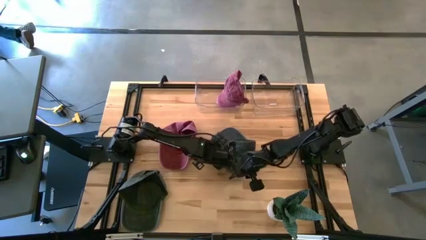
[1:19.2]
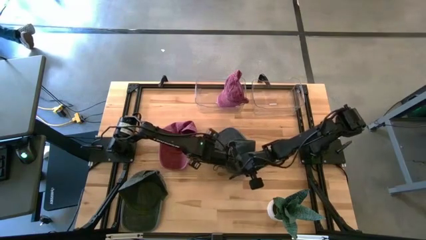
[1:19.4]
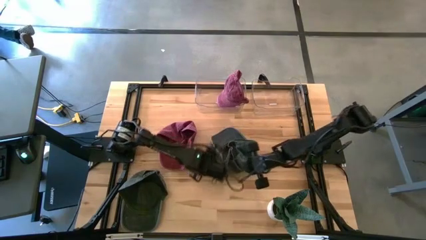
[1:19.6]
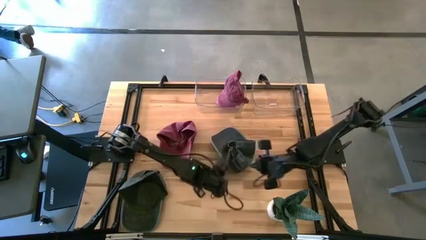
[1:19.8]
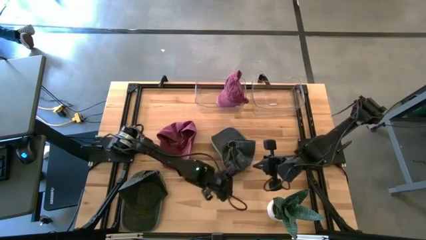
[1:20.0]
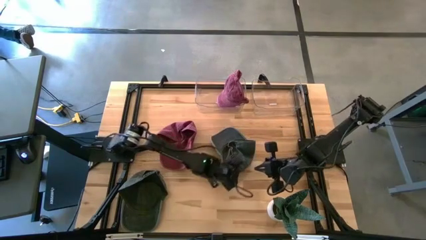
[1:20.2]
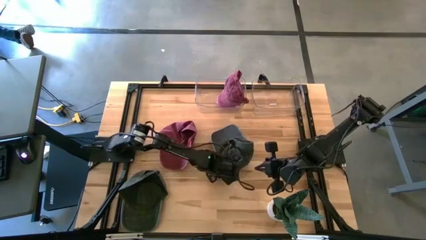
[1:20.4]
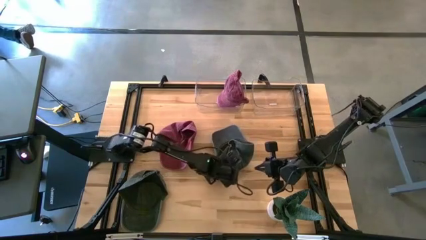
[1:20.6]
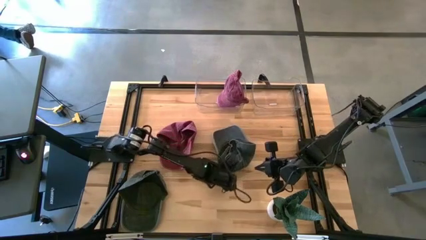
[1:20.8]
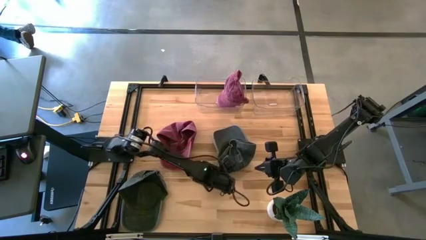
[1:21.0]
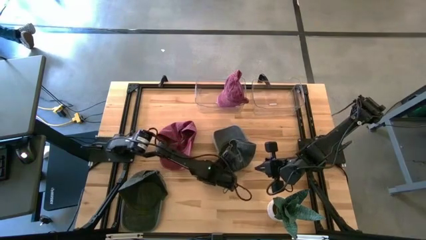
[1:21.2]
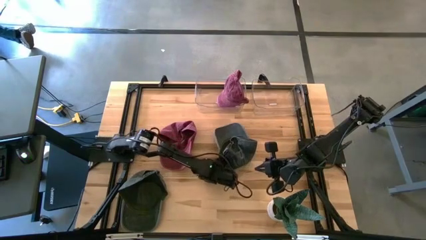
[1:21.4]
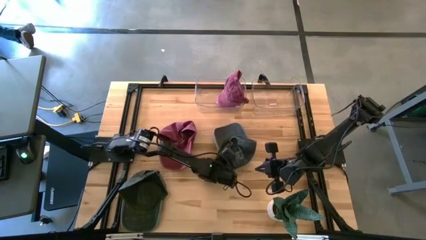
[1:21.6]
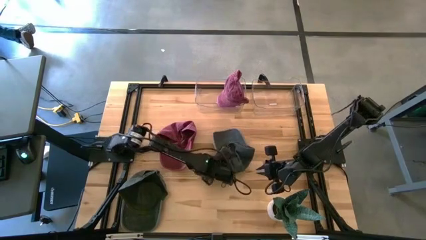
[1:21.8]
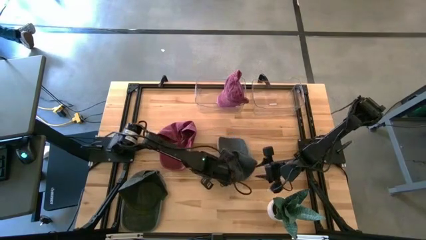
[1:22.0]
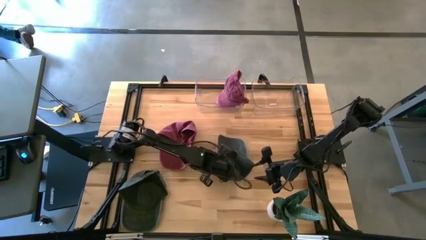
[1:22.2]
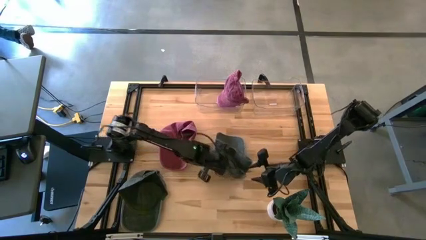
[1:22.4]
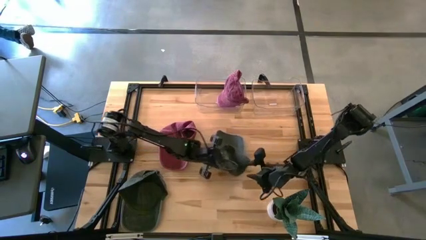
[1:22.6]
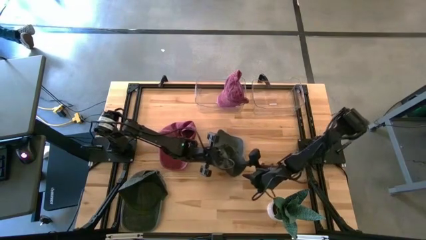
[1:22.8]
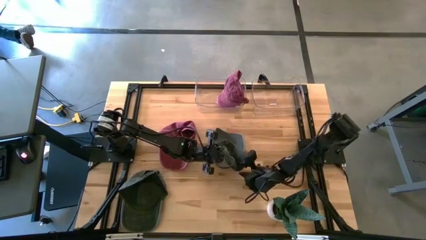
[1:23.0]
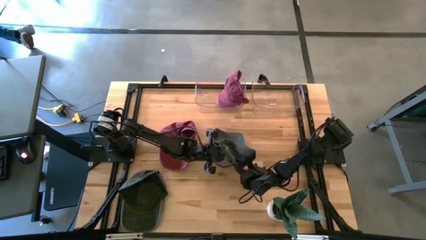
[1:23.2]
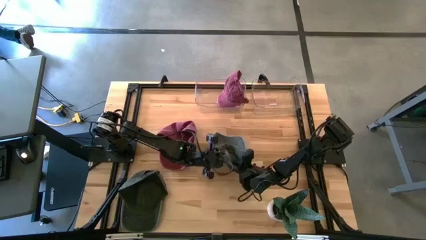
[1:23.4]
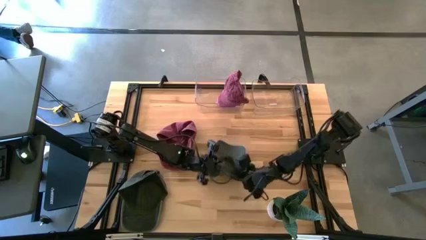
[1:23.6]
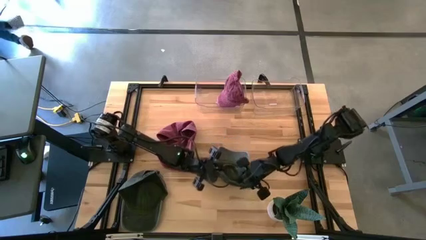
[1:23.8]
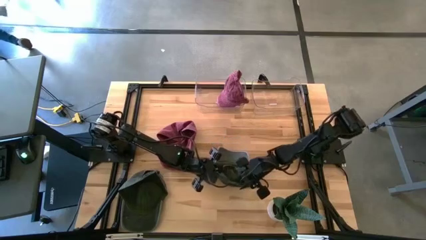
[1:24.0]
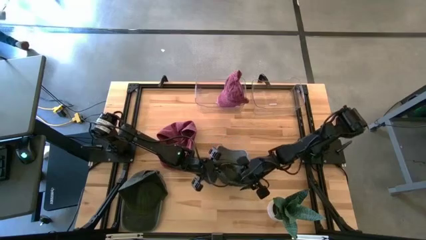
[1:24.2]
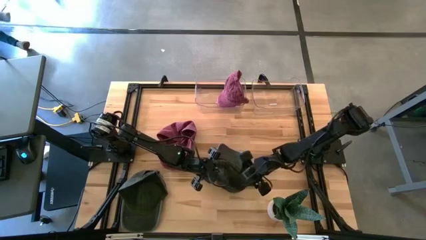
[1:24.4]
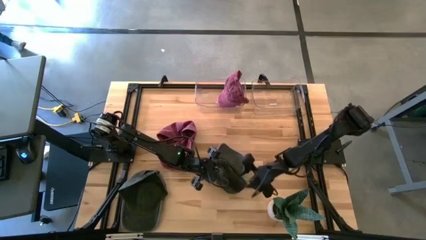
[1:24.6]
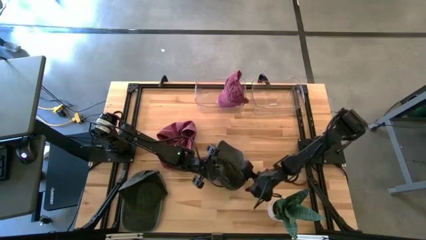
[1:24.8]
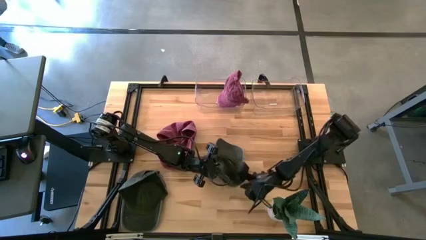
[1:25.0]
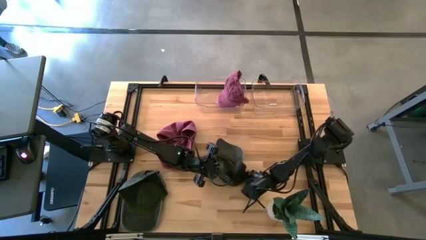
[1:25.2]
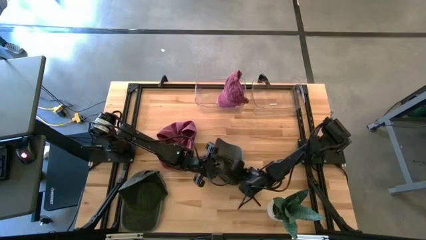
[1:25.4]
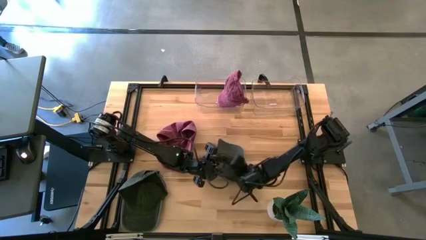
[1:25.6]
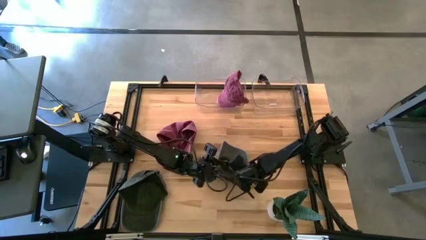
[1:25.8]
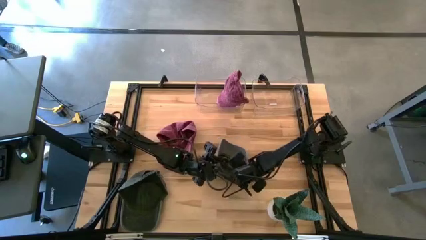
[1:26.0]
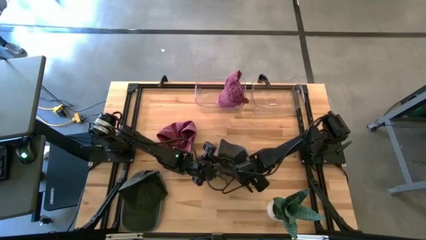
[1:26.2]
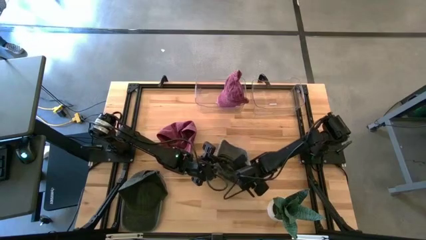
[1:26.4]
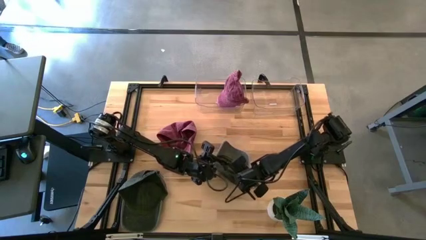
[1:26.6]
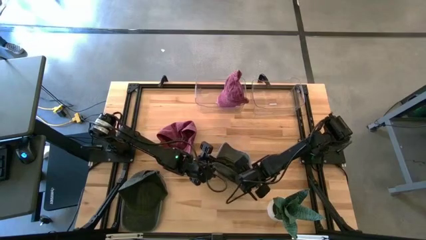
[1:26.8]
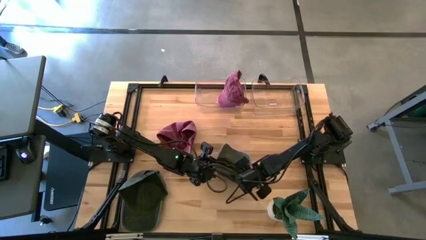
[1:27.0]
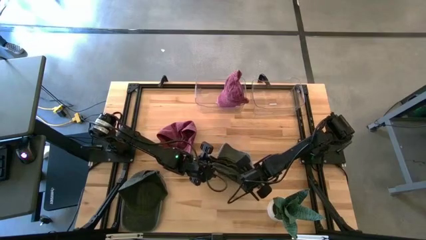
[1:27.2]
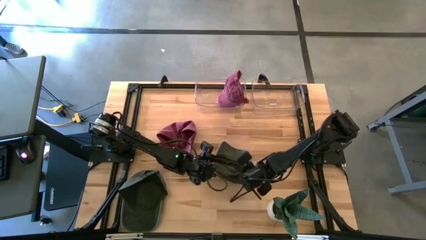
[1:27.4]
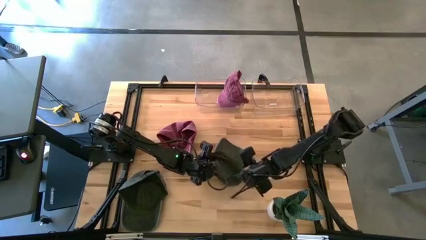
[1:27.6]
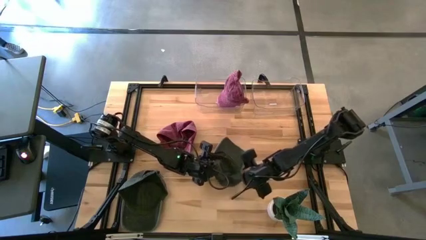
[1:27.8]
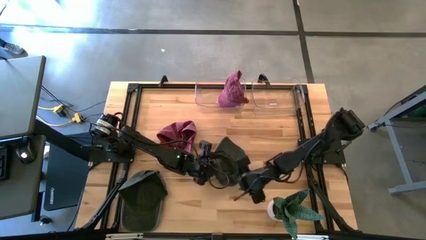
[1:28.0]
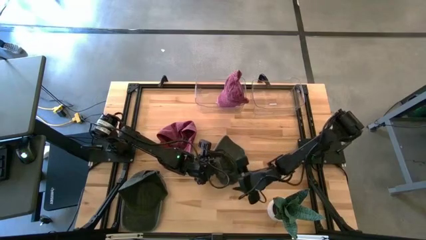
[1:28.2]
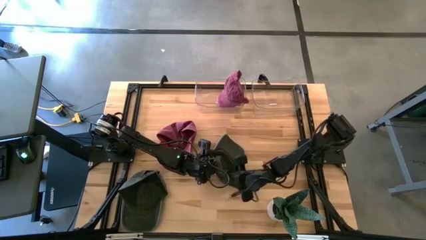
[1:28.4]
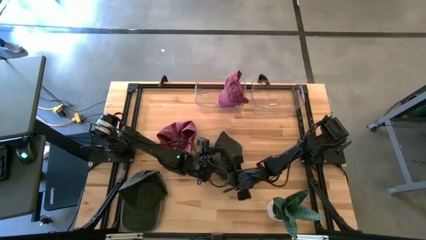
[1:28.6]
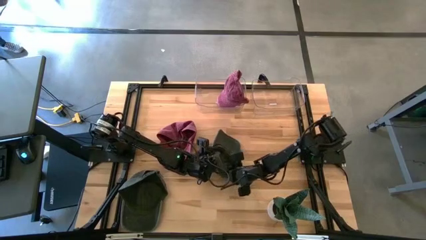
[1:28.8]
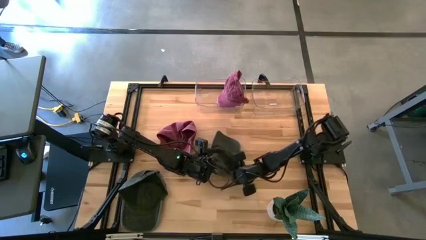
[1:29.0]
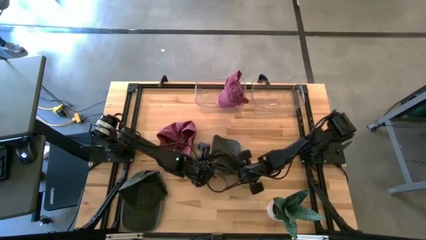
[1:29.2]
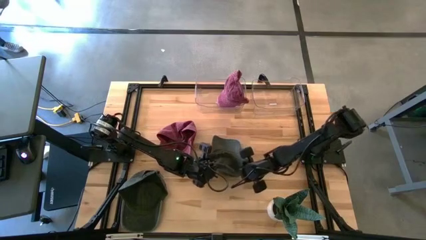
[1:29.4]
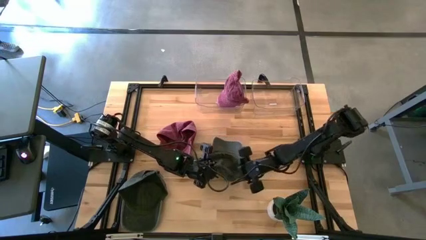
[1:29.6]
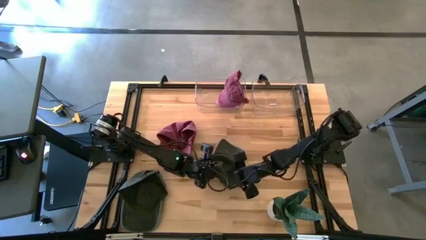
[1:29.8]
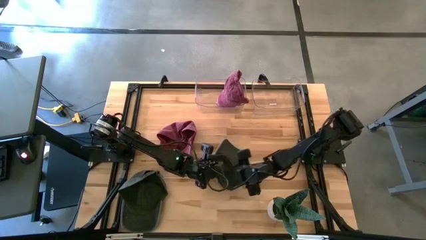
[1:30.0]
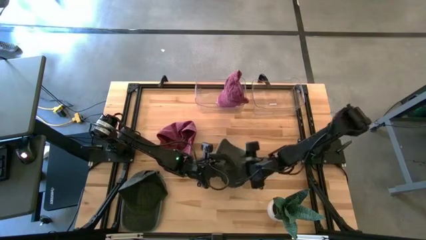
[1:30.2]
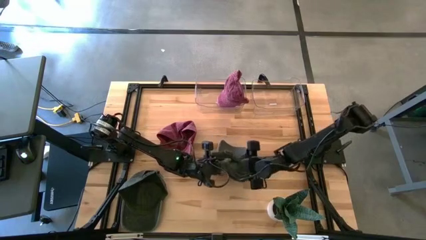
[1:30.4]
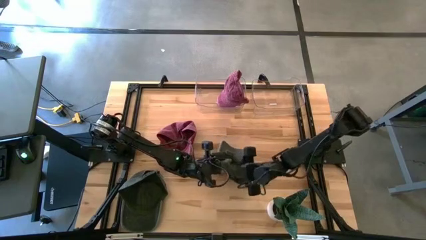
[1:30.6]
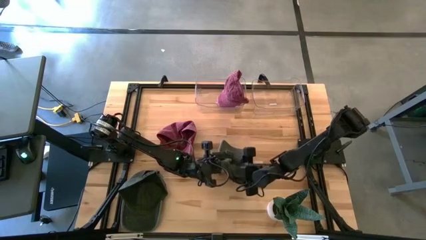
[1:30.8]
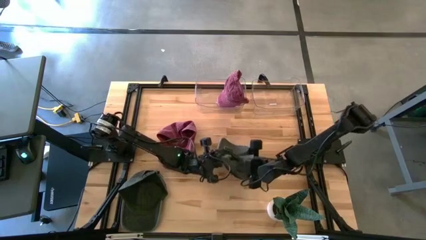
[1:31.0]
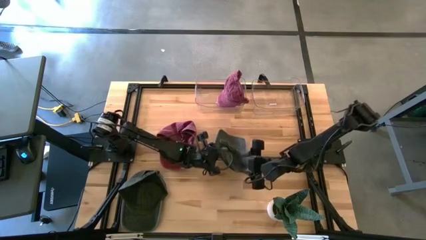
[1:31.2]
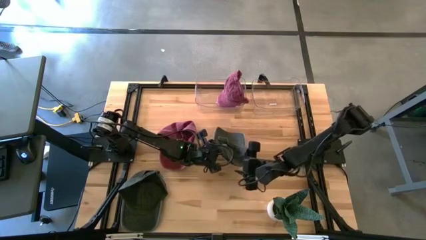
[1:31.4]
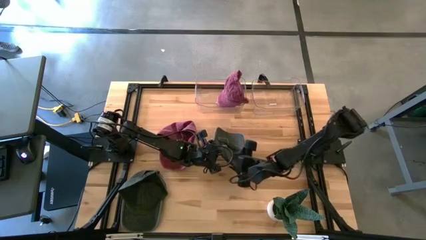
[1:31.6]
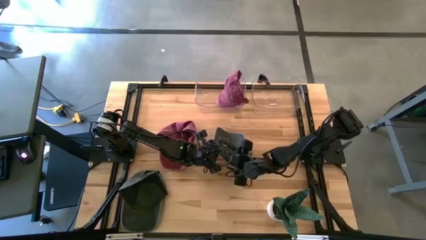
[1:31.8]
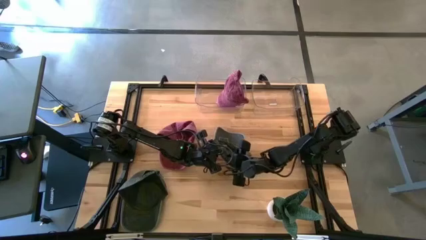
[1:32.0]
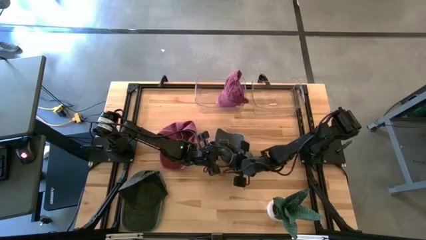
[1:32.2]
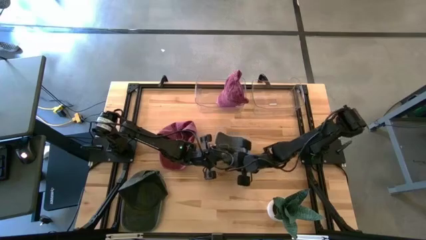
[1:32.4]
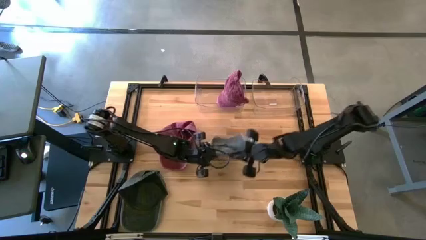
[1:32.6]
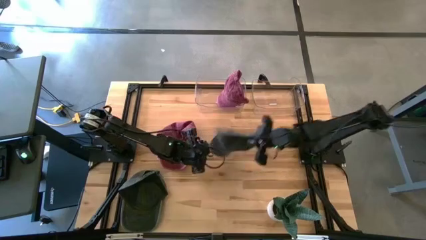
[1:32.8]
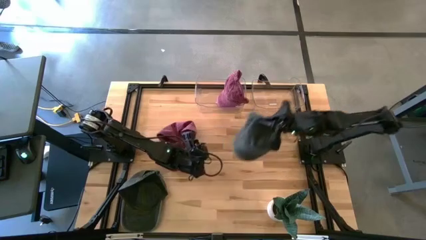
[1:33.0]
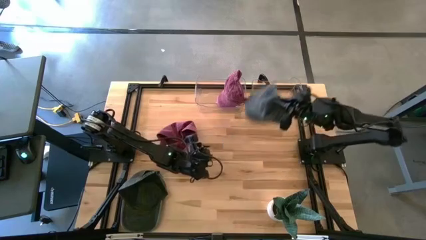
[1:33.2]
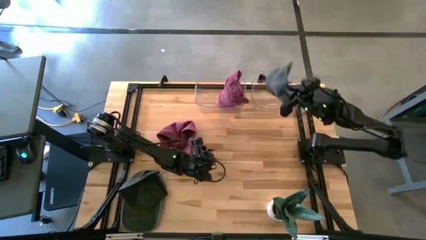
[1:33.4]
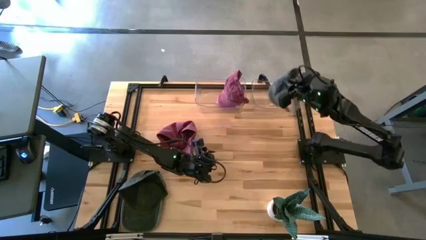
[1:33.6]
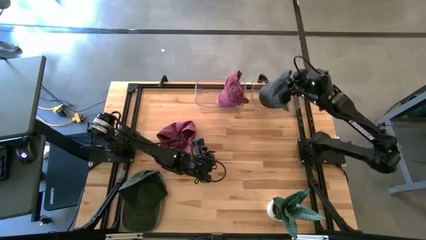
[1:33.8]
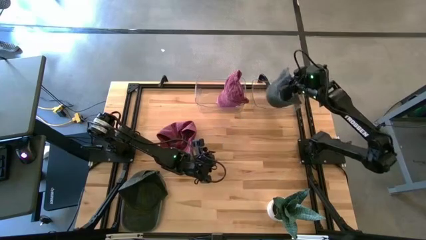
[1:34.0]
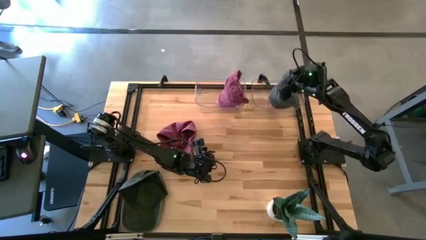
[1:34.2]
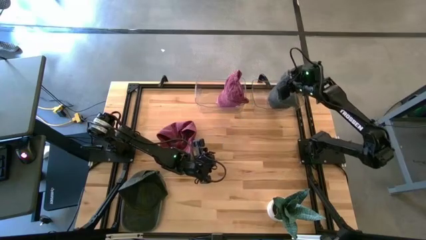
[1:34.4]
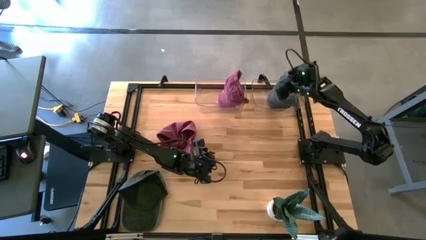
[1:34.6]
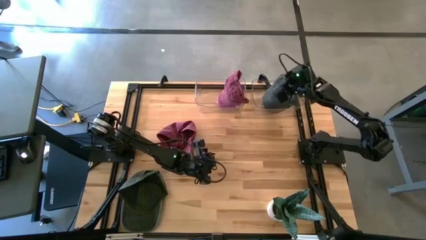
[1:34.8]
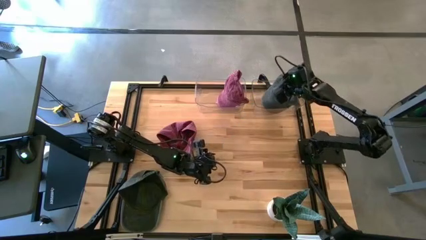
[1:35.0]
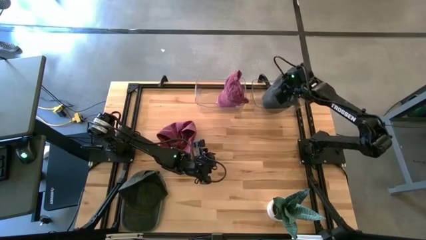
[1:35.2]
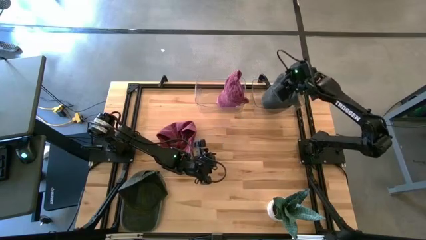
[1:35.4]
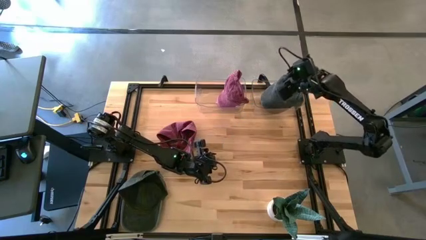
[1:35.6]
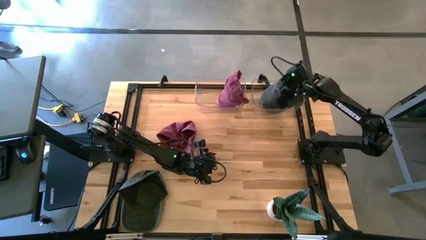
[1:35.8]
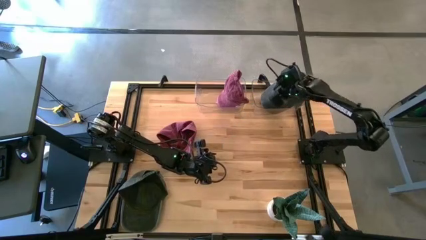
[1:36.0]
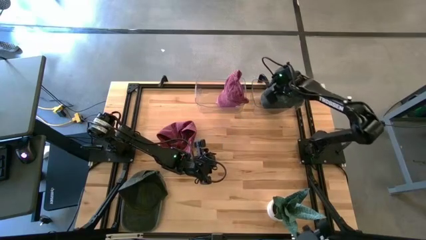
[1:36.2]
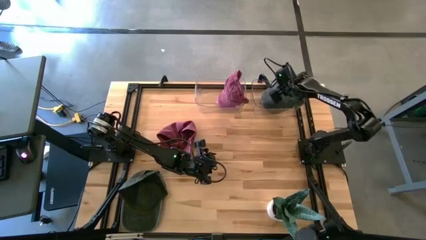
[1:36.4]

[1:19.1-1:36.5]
Task: Pick & Place hat
Put the top black cap into the right transparent bin
